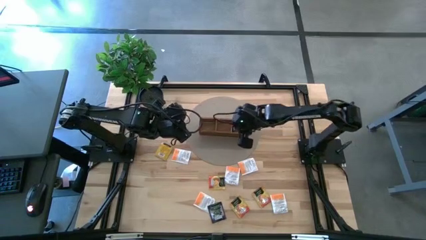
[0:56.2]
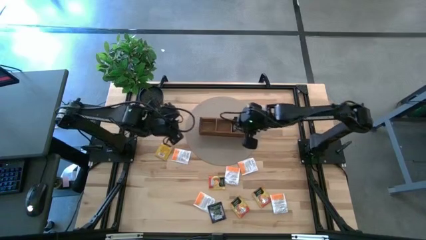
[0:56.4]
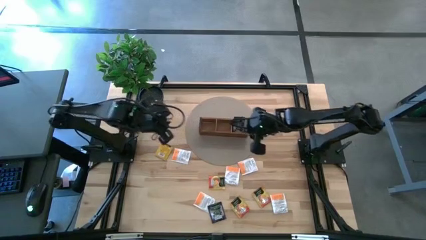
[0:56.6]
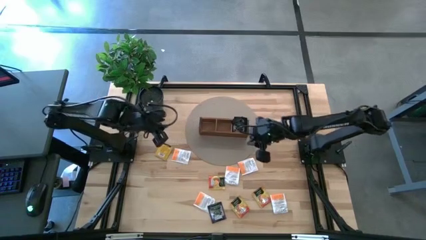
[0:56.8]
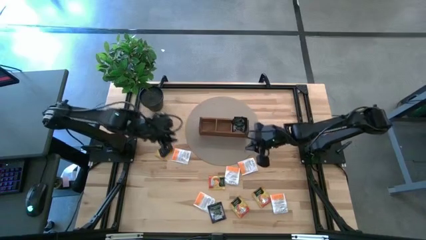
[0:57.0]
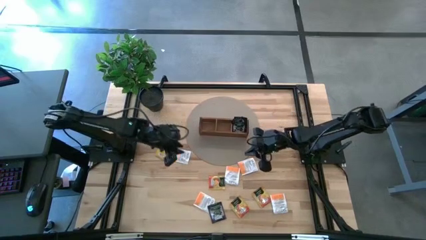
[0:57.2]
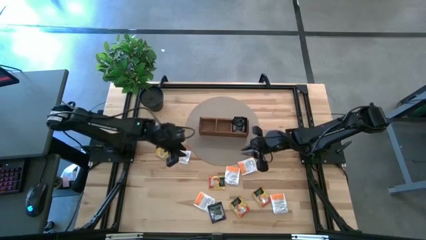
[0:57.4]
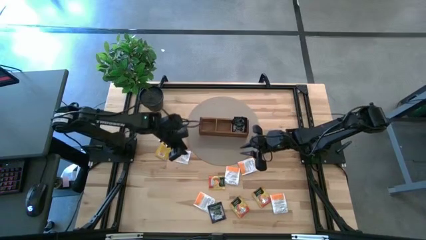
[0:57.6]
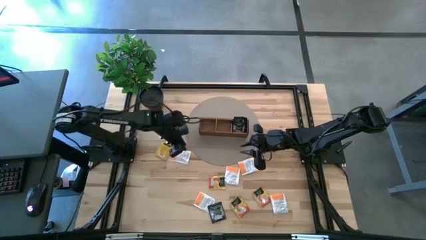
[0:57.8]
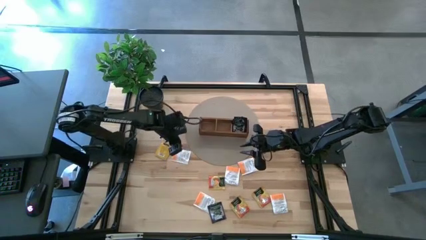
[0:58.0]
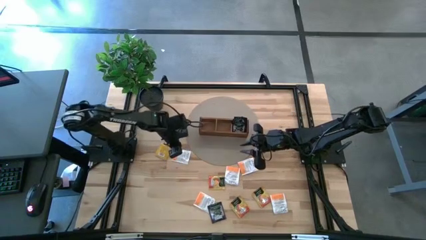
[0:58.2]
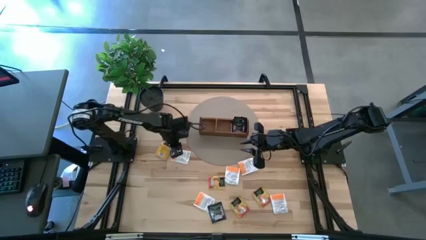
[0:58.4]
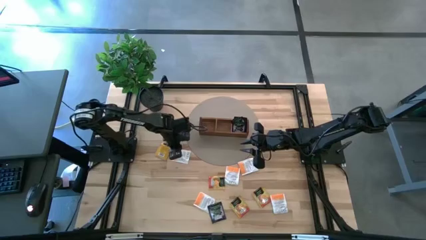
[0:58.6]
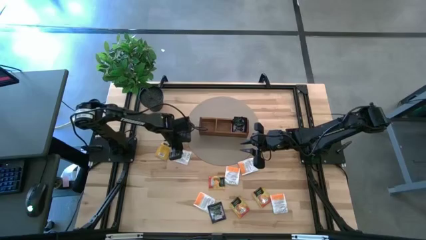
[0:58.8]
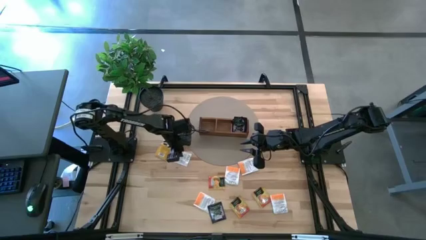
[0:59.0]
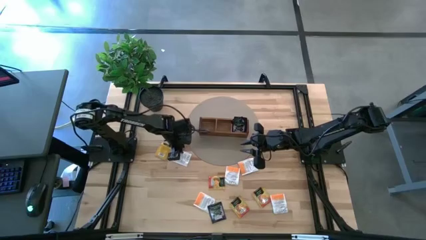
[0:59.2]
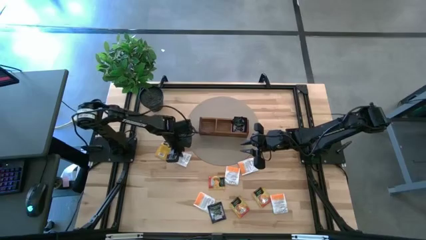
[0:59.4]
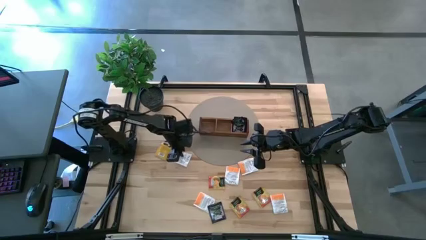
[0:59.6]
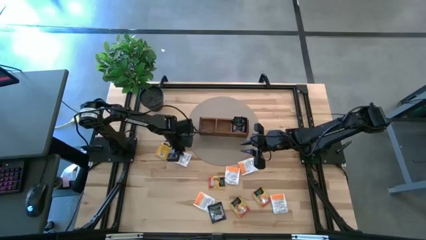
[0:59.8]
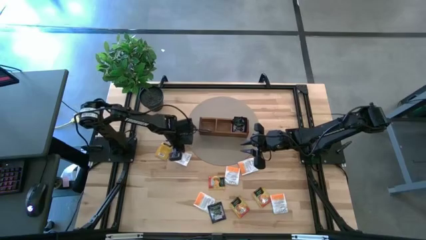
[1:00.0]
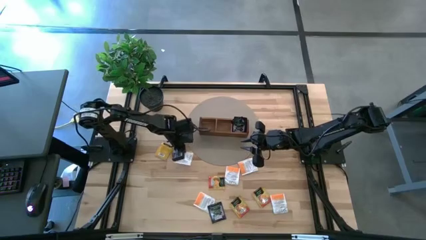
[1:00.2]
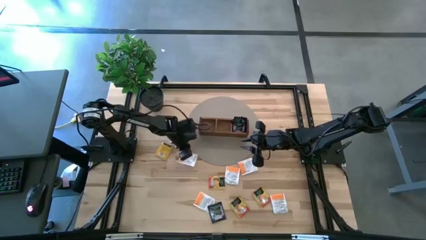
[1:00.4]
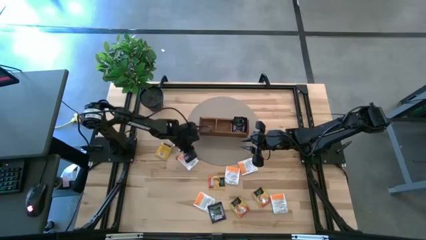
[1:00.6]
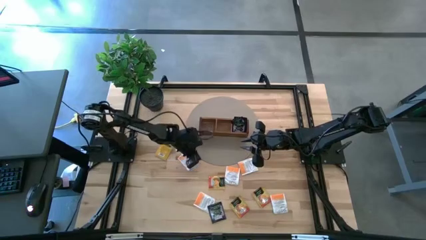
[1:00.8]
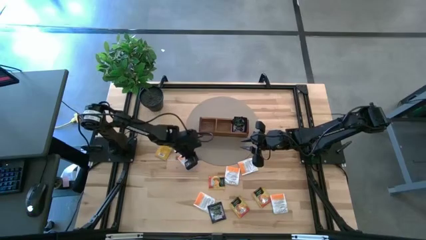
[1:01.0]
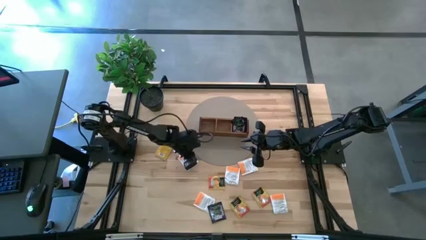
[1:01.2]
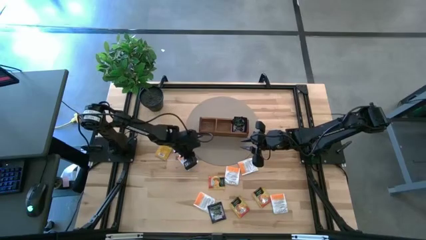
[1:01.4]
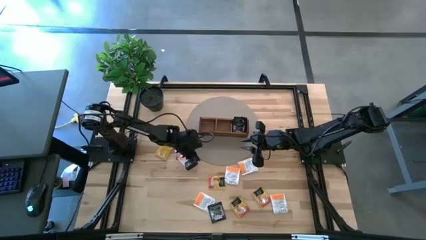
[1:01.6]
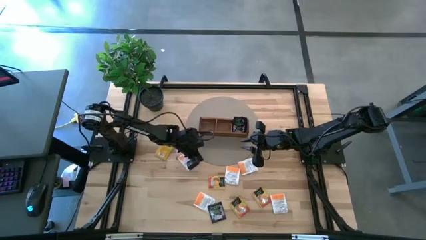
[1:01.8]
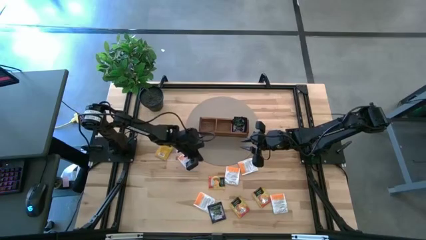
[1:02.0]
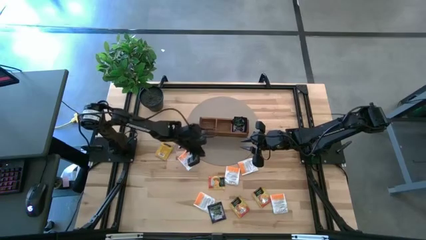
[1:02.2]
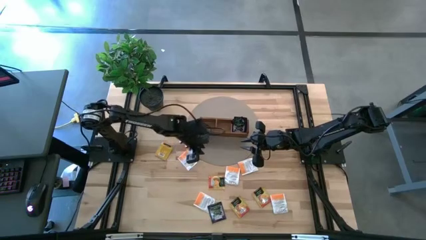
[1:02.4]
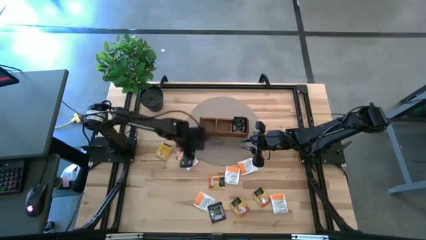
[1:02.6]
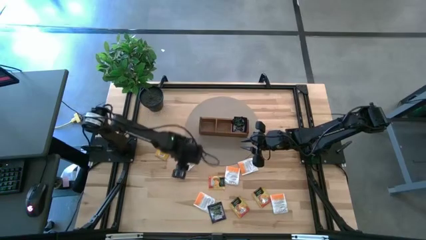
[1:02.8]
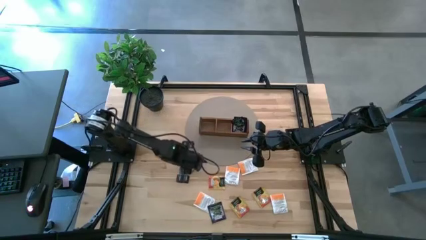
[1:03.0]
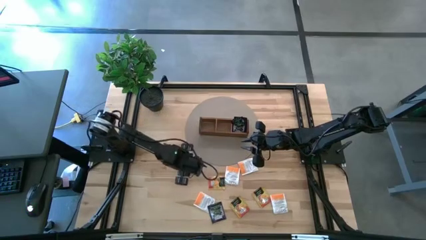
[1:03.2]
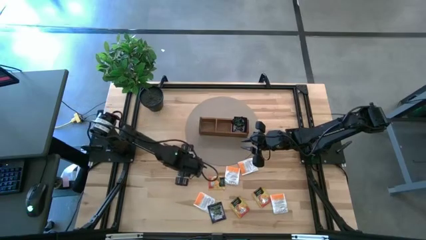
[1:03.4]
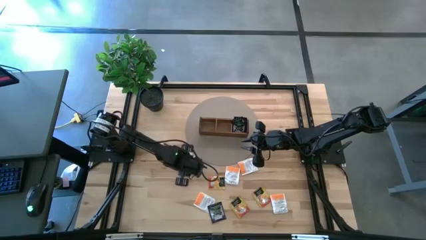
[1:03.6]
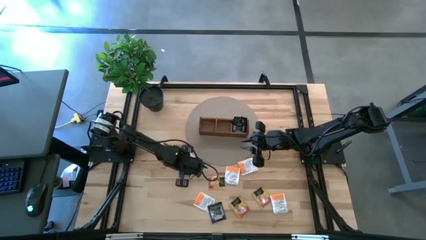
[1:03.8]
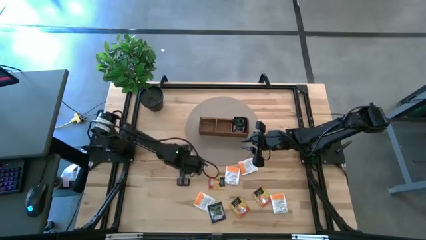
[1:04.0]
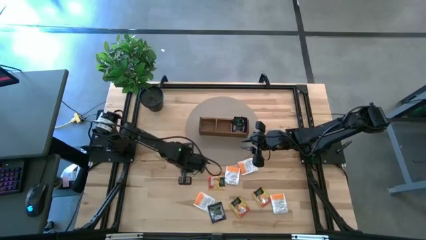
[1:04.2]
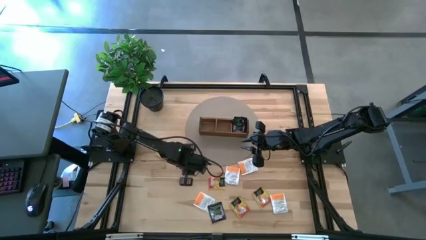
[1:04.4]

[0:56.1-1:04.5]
Task: Pick & Place Tea
Put the white tea bag into the middle section of the wooden organizer

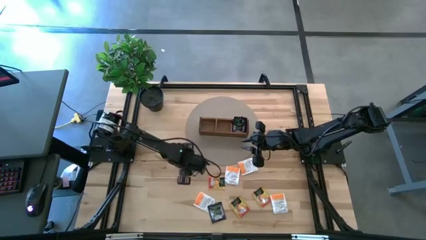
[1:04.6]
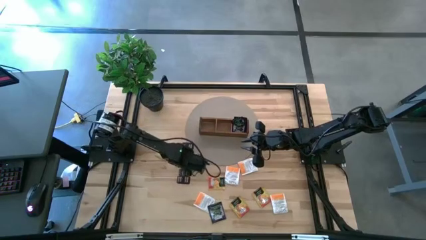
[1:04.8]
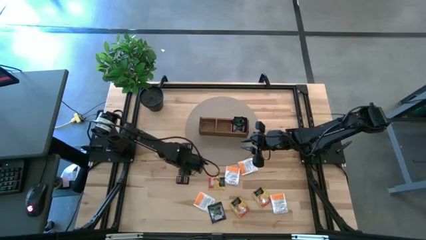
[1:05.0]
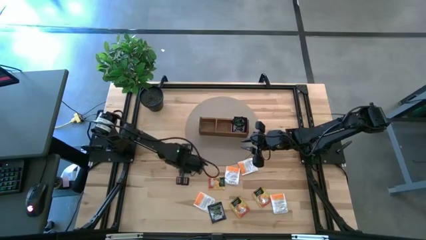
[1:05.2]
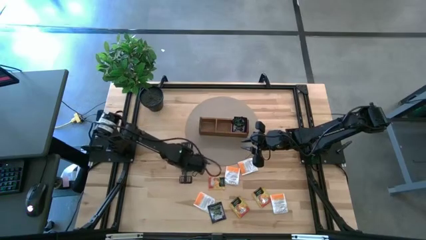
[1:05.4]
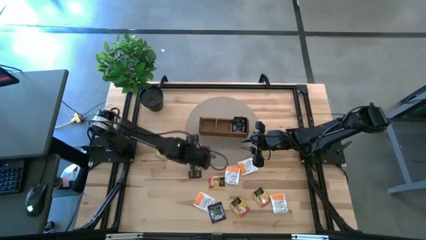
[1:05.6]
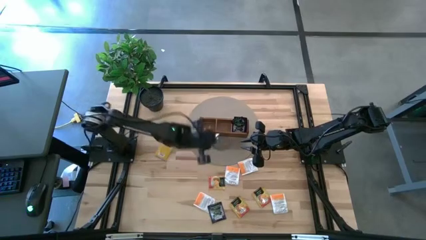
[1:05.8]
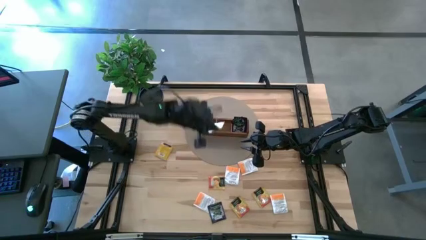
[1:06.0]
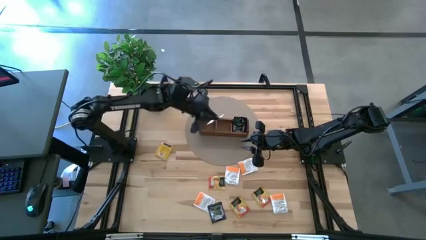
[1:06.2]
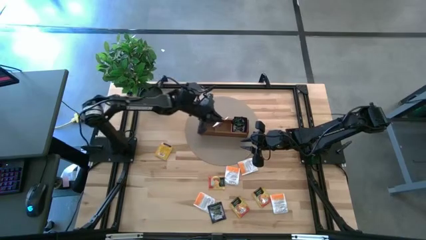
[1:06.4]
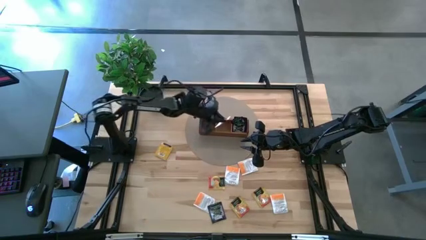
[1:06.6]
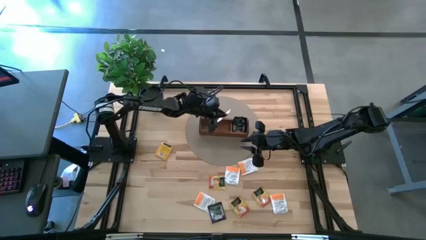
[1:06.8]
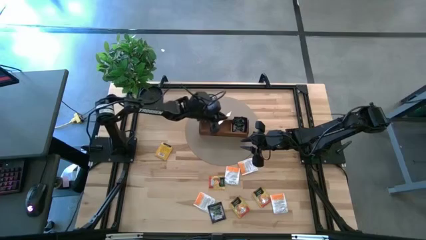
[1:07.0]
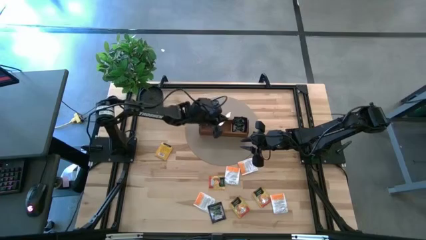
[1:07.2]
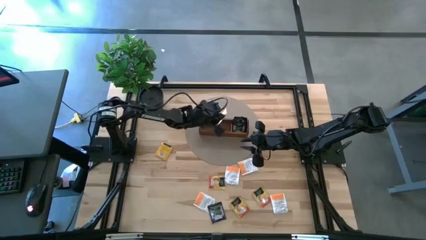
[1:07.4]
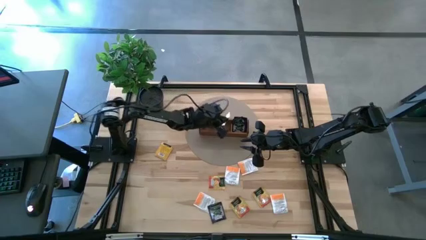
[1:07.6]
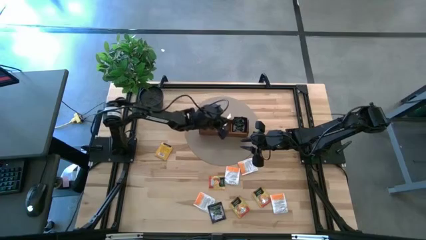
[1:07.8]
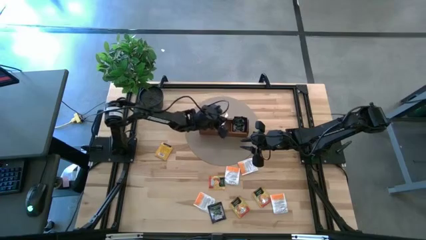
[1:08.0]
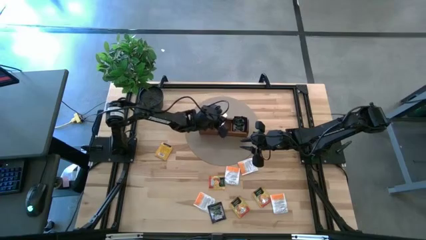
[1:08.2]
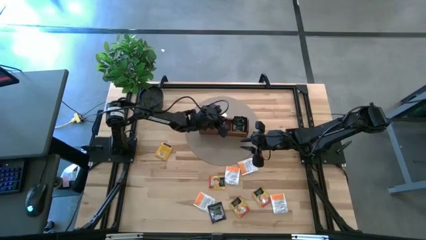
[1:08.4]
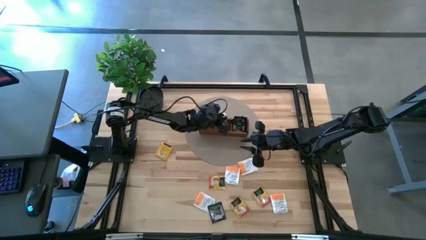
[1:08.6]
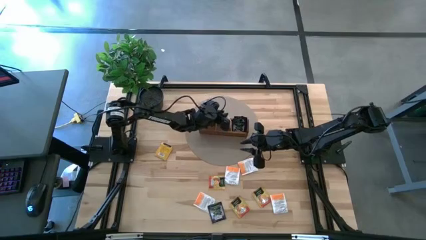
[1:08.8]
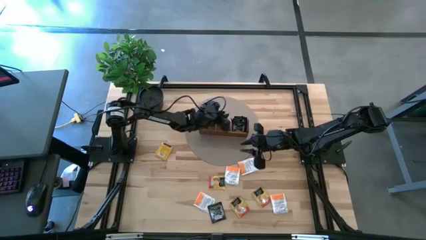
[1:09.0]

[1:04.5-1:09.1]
Put the white tea bag into the middle section of the wooden organizer
